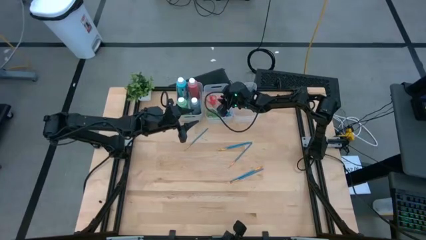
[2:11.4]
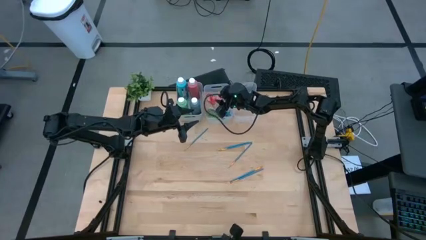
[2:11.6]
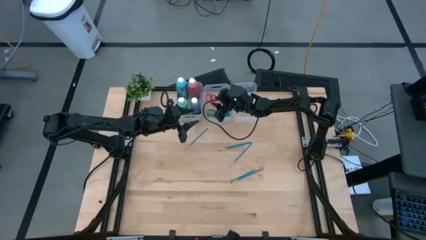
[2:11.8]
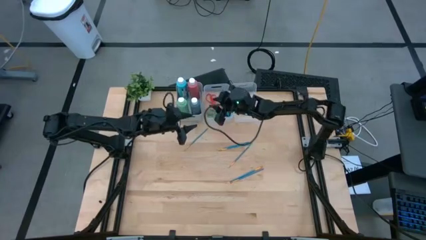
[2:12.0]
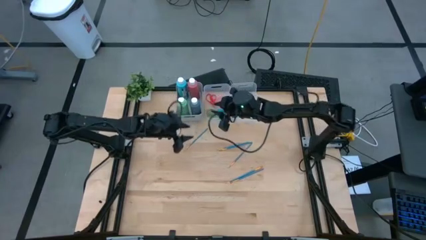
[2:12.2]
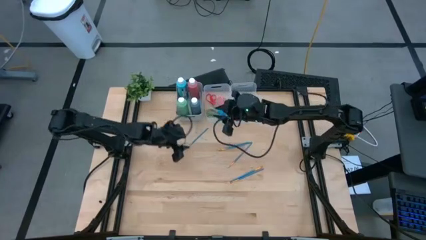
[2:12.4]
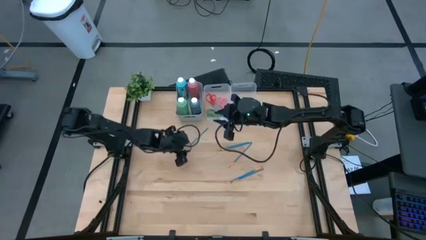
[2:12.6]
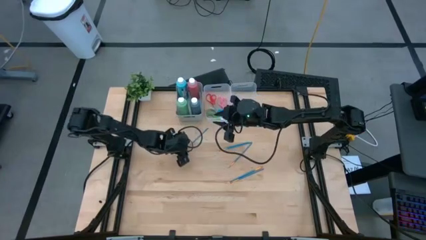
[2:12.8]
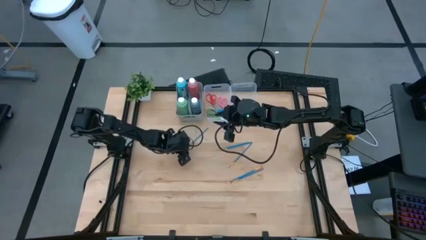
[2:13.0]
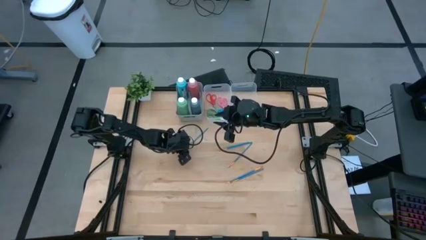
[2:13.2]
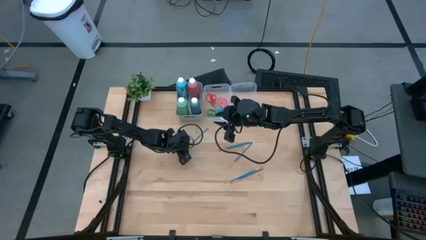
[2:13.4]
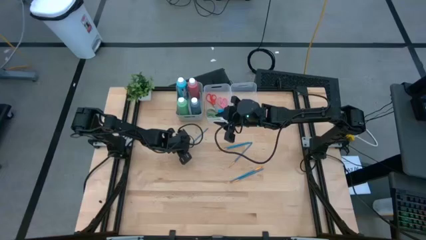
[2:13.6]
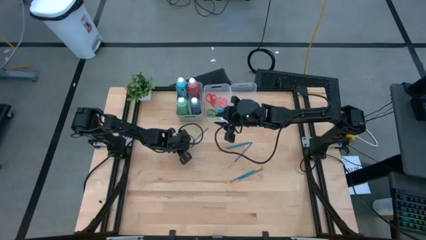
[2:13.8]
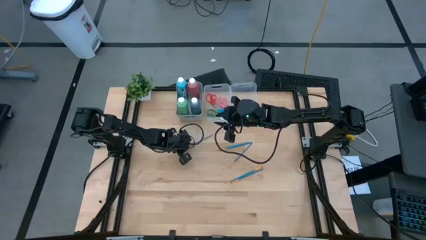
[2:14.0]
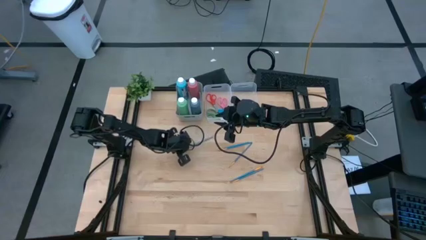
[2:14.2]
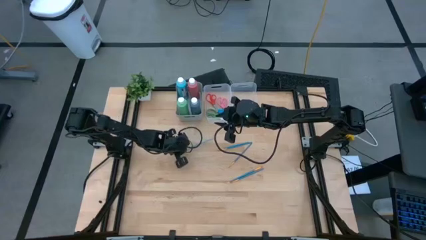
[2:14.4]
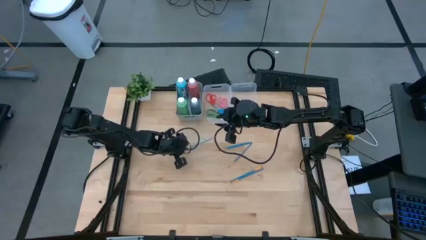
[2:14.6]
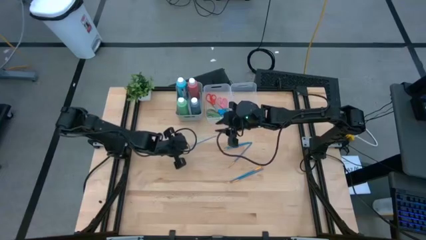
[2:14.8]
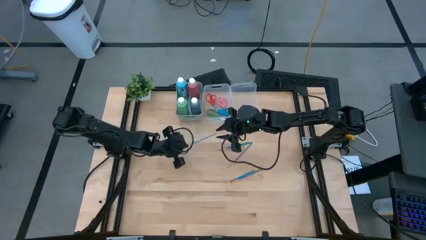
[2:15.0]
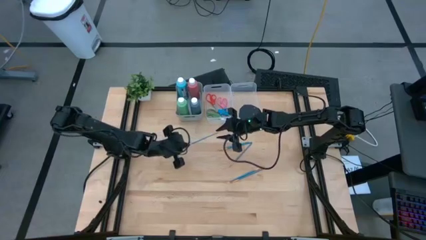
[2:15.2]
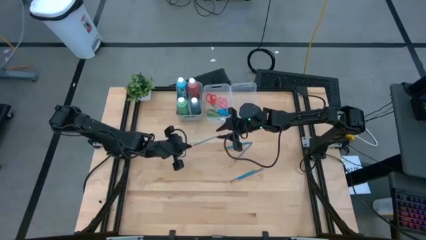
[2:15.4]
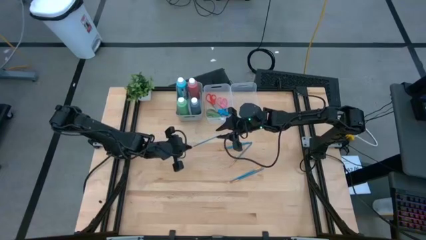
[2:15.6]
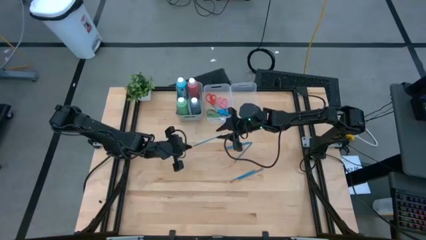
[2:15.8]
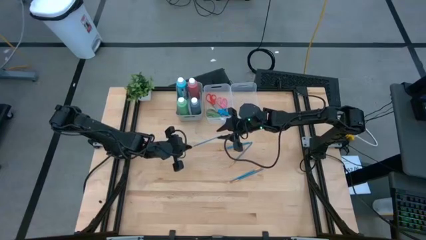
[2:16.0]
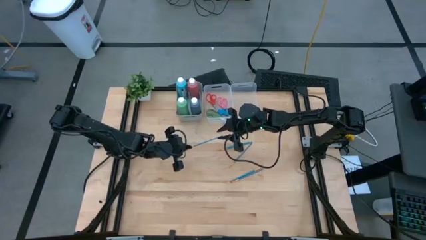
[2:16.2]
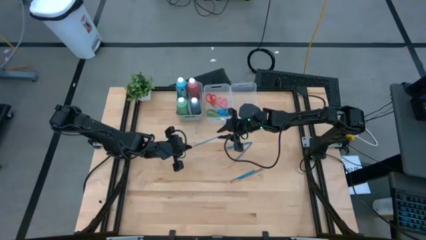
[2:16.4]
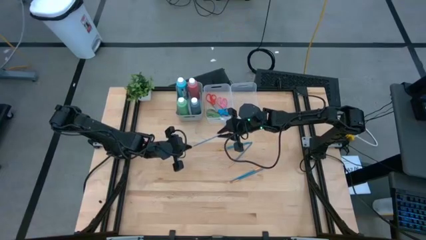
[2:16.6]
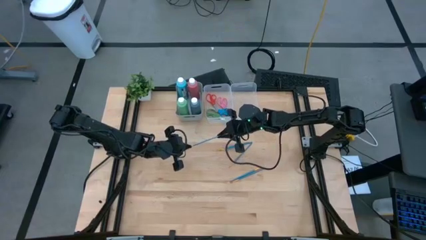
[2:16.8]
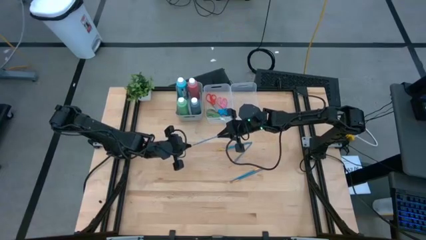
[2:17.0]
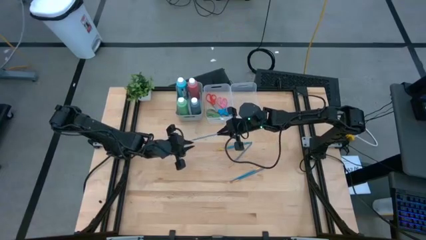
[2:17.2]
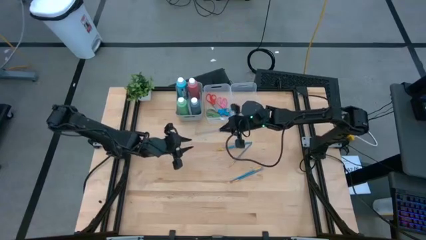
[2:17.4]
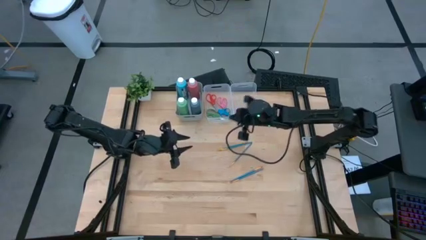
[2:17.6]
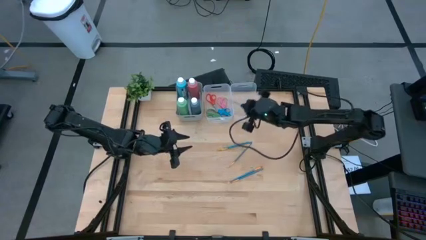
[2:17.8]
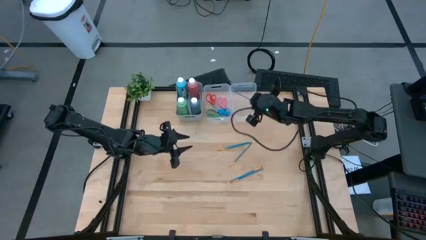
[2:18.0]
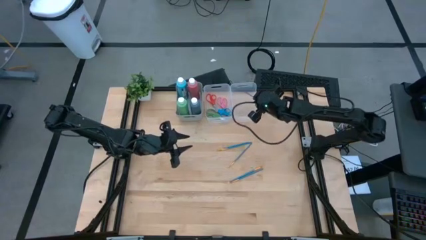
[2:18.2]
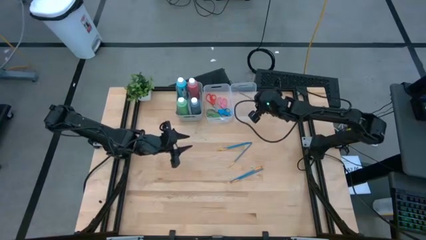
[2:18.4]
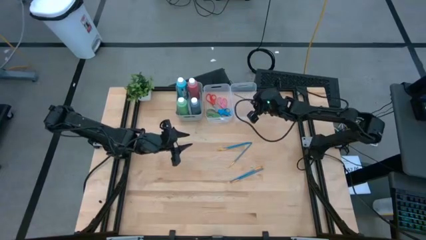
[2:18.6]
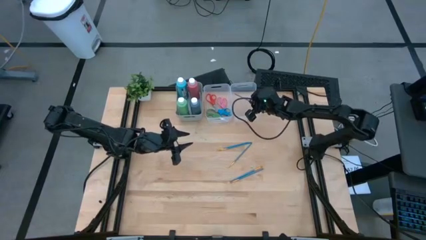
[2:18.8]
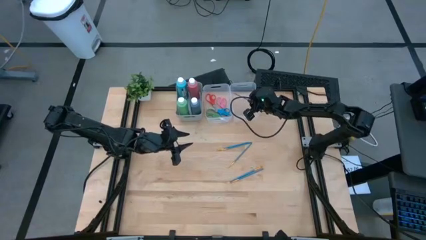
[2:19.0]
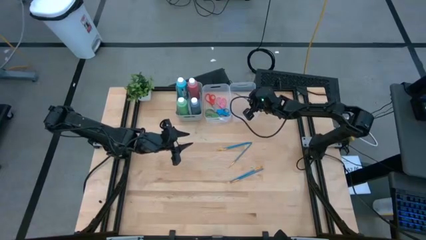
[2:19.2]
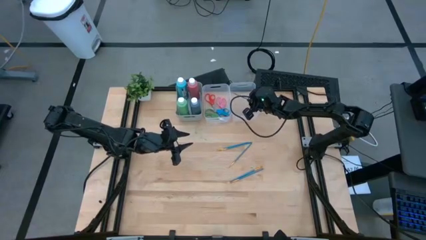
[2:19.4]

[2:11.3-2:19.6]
Task: Pick & Place Paint Supplies
Put the blue paint brush into the right transparent bin

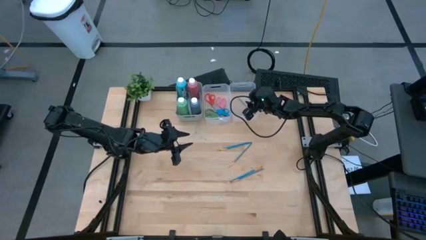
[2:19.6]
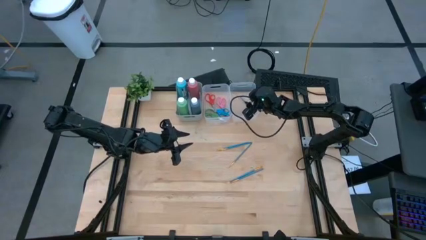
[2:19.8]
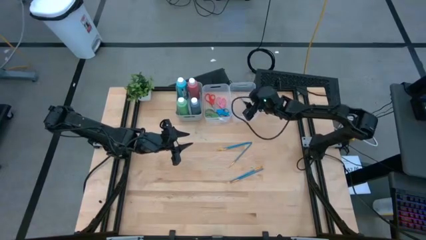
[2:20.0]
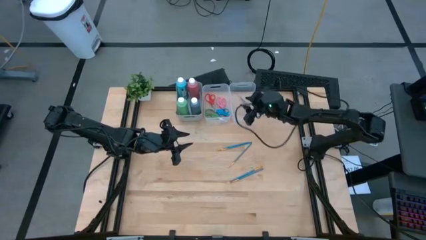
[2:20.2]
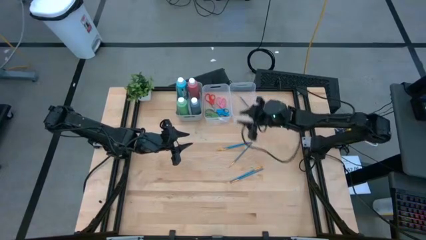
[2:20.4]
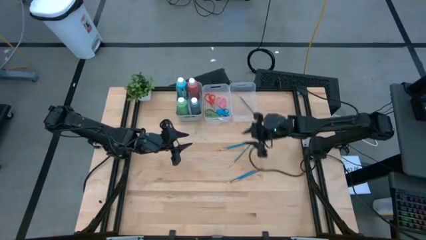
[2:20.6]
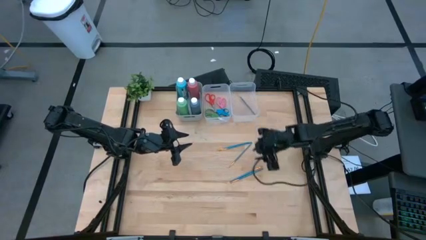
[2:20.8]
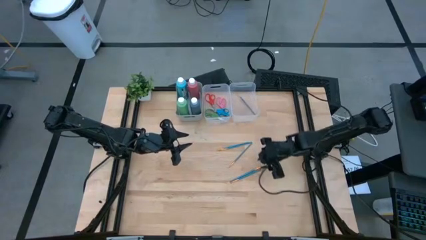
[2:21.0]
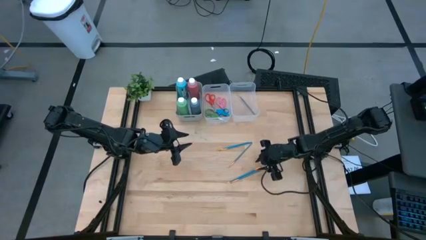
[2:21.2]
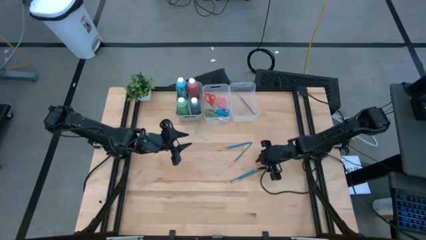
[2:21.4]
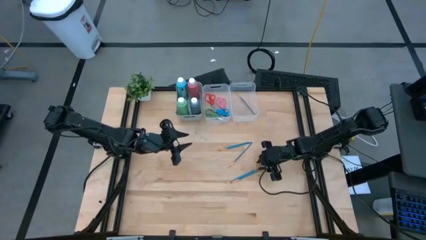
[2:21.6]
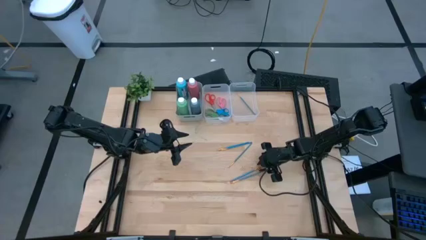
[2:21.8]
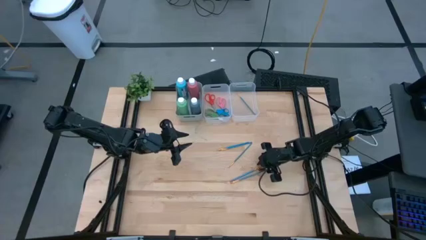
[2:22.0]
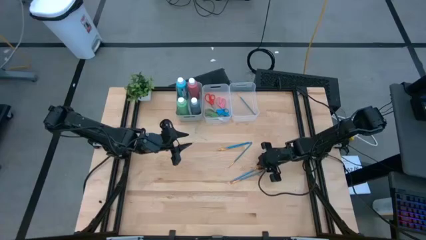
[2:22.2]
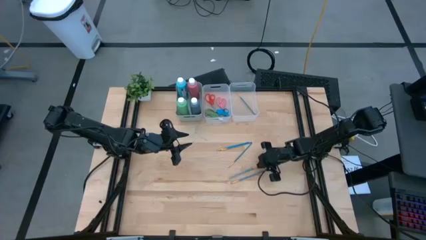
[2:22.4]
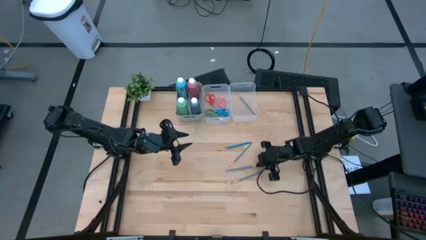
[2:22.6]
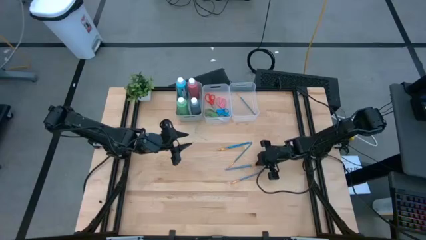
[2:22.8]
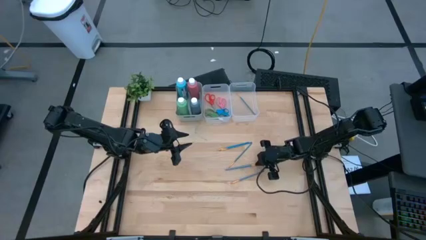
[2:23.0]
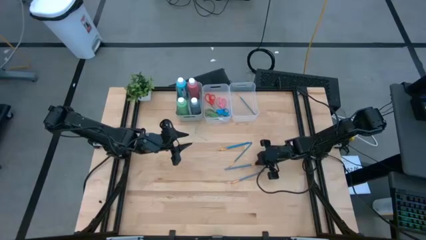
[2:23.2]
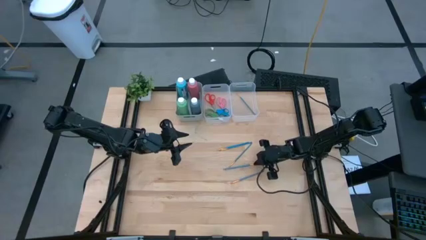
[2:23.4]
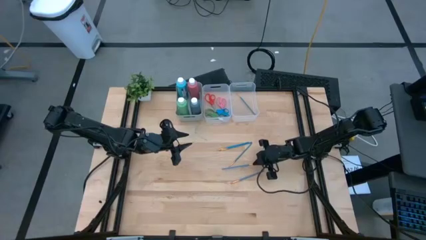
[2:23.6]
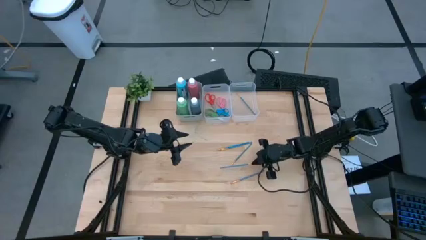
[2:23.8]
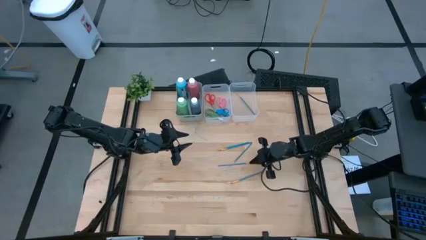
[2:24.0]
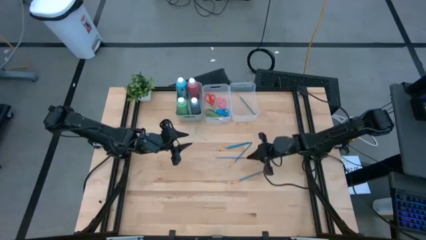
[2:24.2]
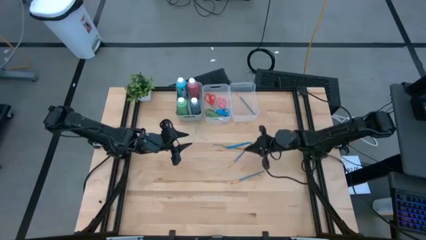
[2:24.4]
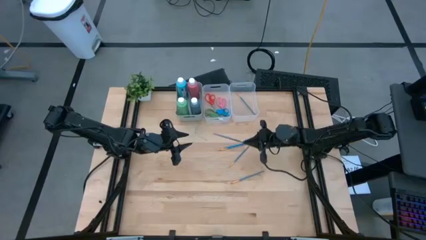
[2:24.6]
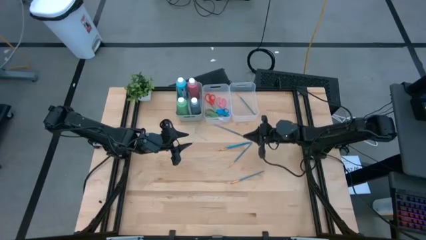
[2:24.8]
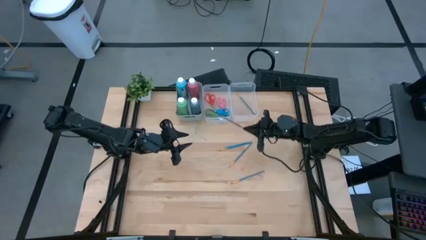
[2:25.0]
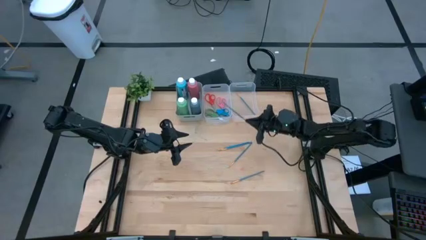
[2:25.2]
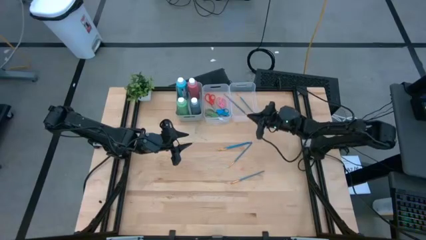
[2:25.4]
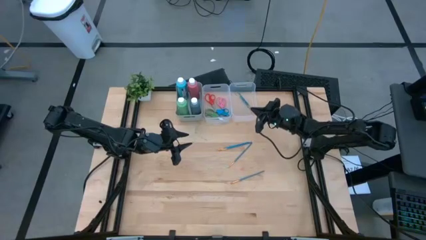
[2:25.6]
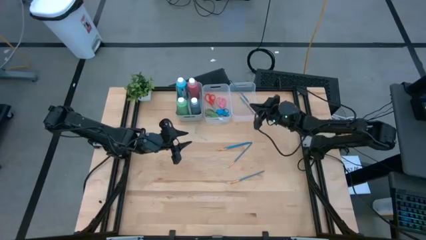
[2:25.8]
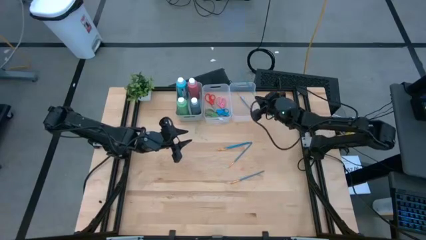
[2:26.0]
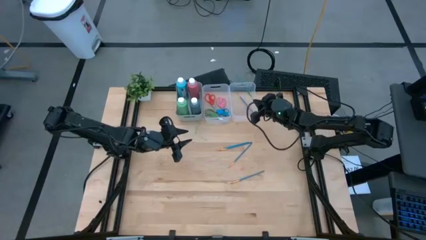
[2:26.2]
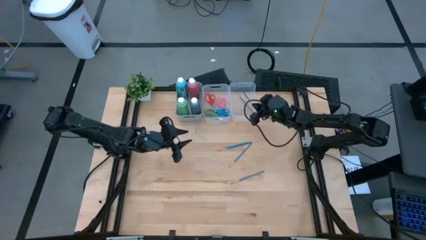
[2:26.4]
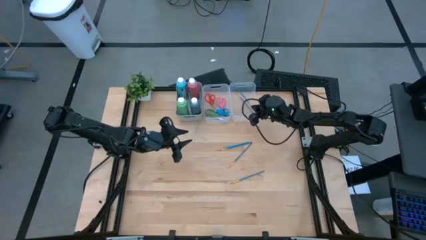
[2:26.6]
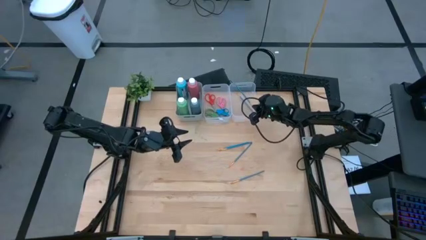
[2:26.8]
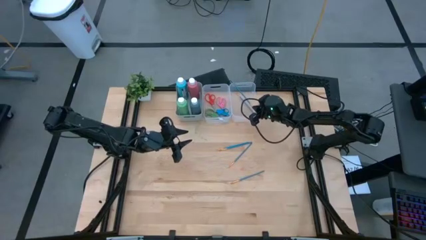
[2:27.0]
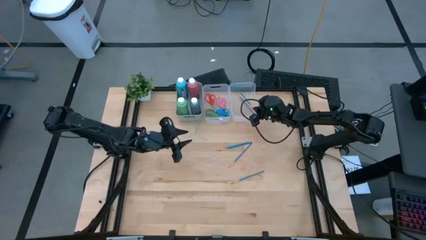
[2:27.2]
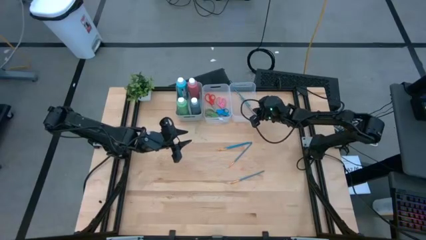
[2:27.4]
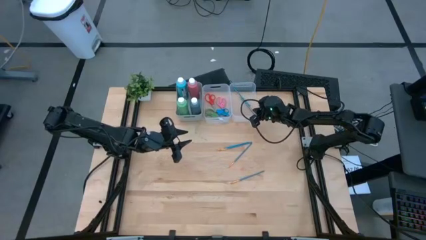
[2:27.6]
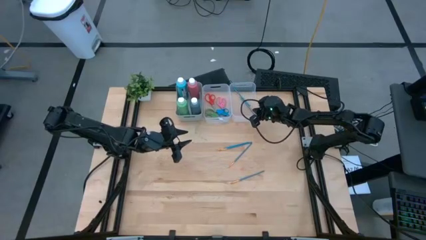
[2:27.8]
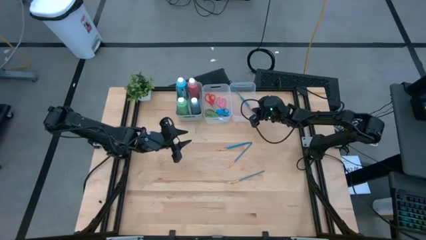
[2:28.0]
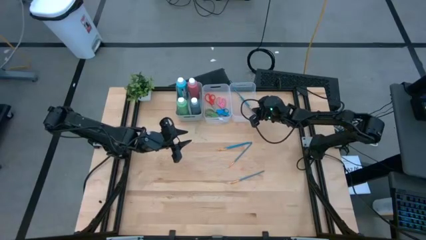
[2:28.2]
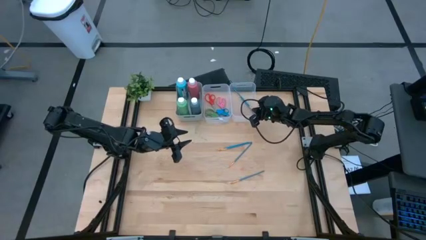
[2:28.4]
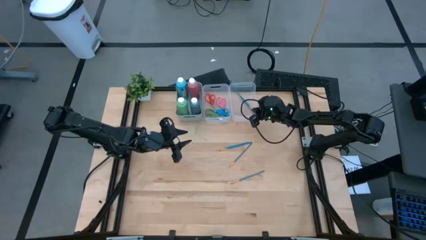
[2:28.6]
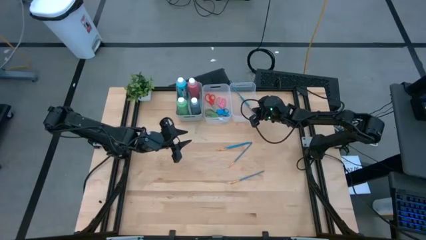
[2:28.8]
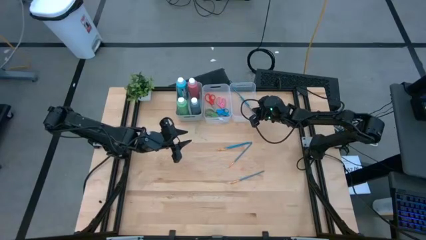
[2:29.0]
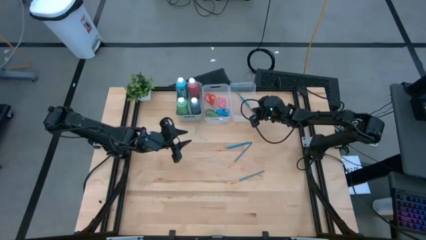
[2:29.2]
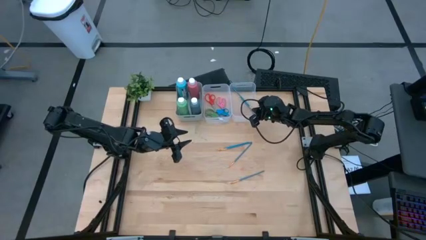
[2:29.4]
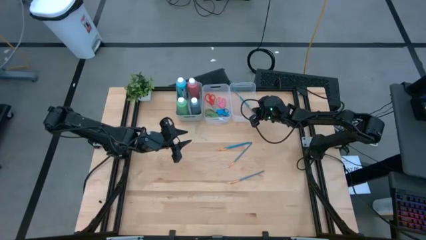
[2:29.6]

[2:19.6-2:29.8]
Put the blue paint brush into the right transparent bin
